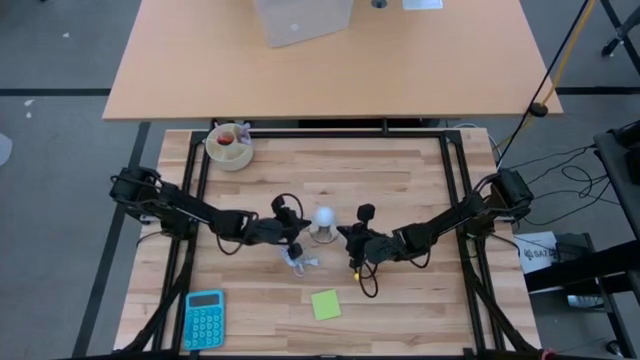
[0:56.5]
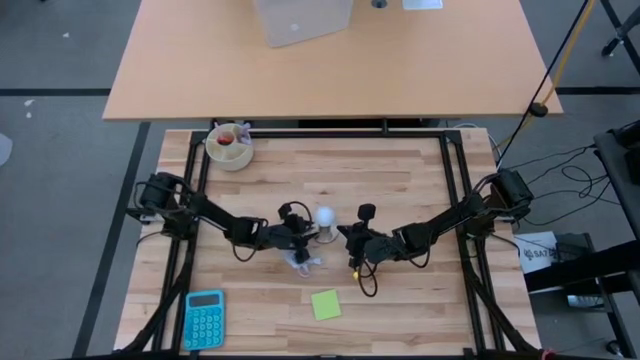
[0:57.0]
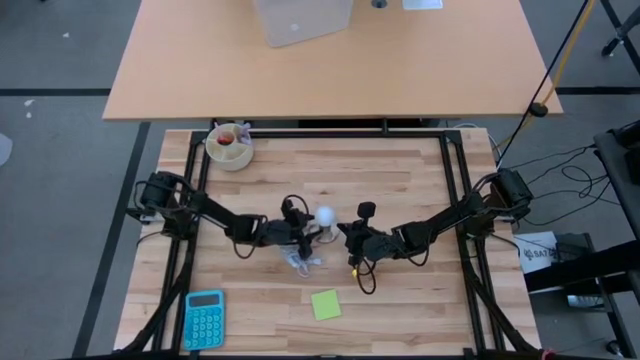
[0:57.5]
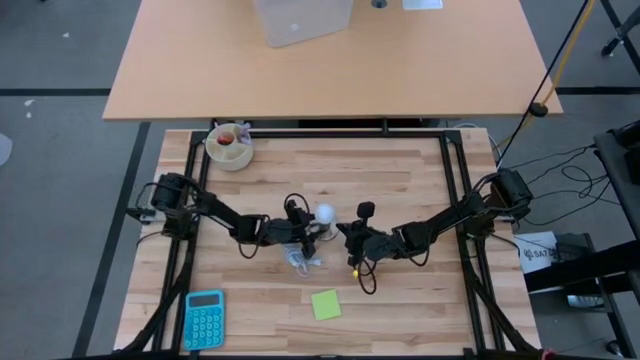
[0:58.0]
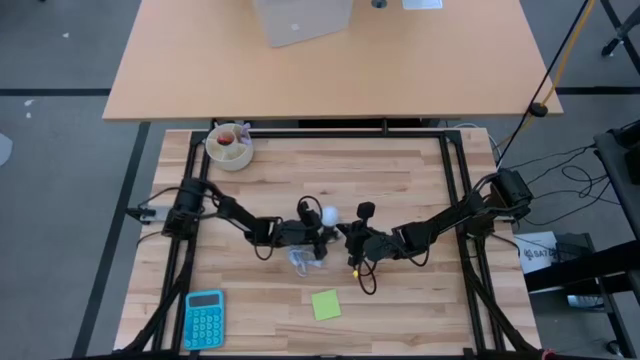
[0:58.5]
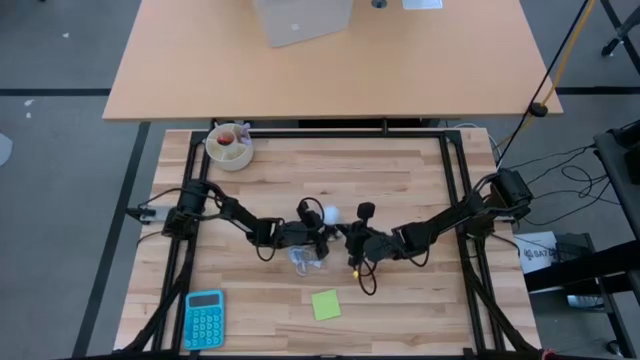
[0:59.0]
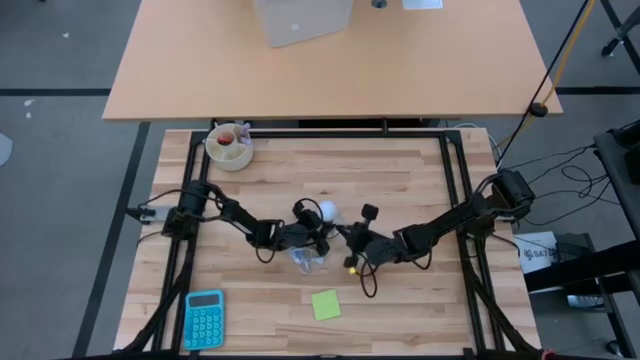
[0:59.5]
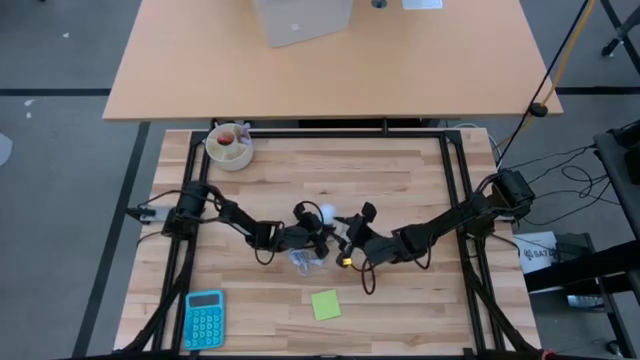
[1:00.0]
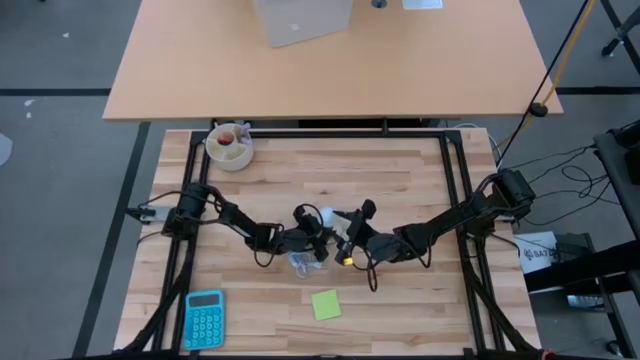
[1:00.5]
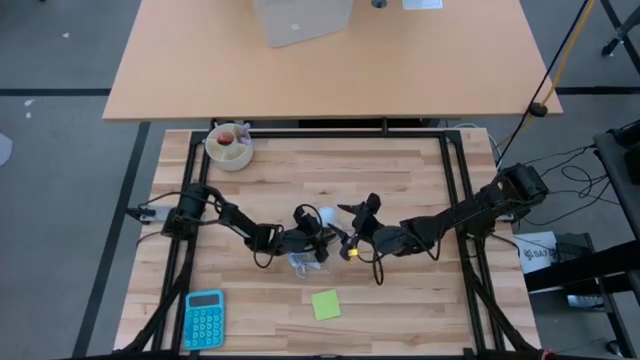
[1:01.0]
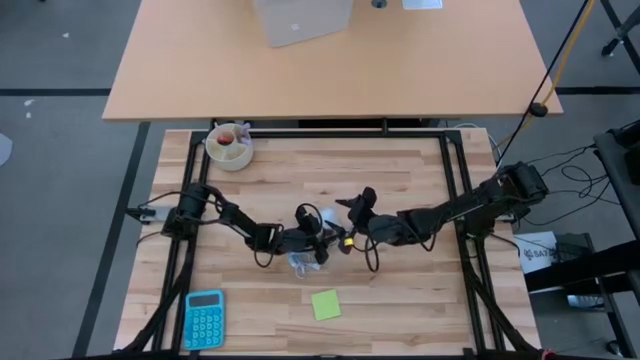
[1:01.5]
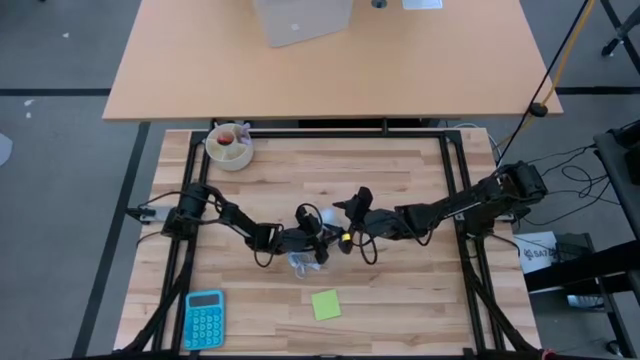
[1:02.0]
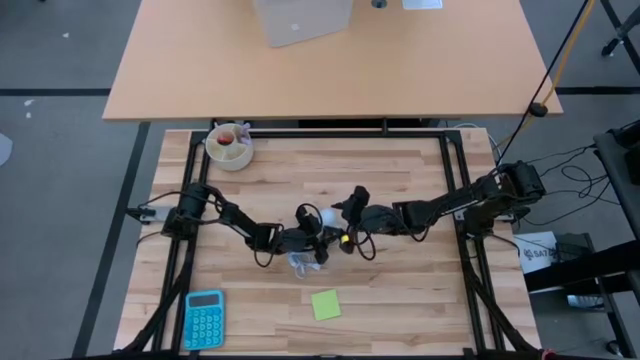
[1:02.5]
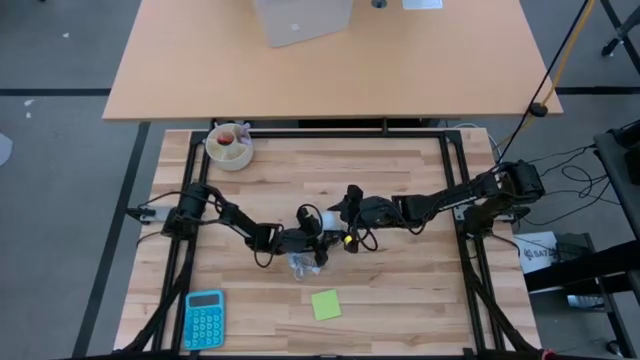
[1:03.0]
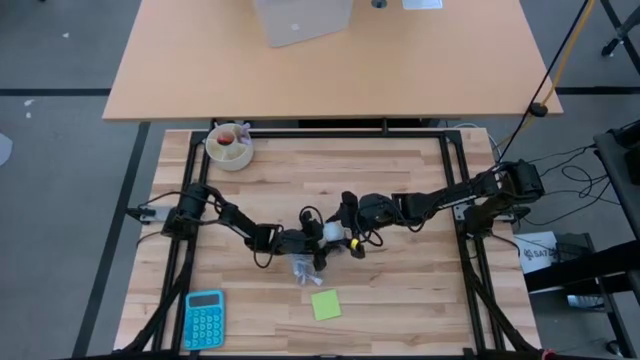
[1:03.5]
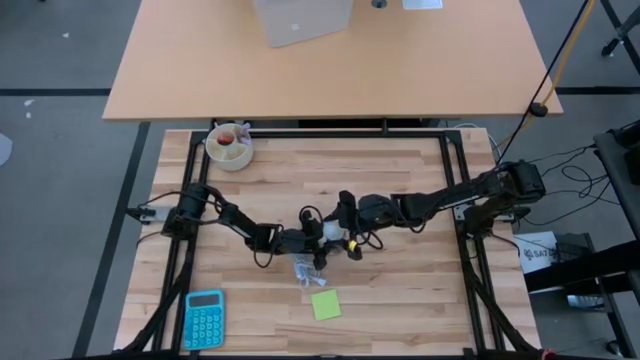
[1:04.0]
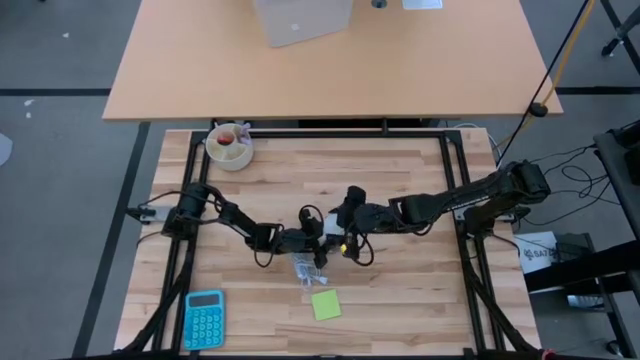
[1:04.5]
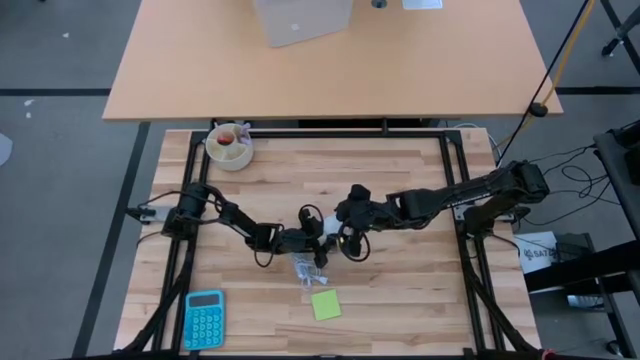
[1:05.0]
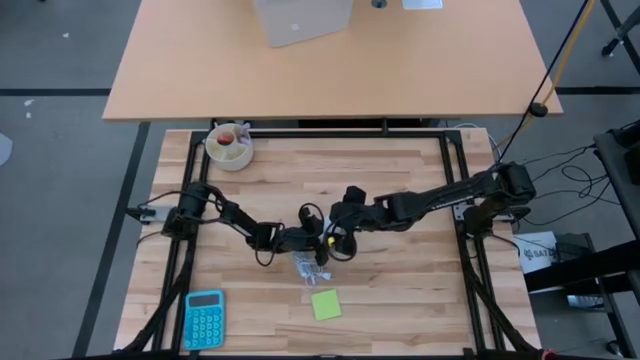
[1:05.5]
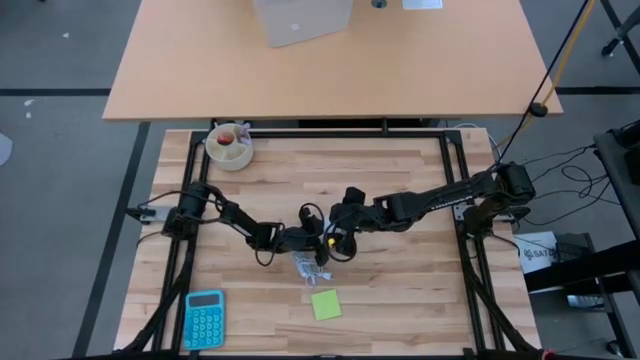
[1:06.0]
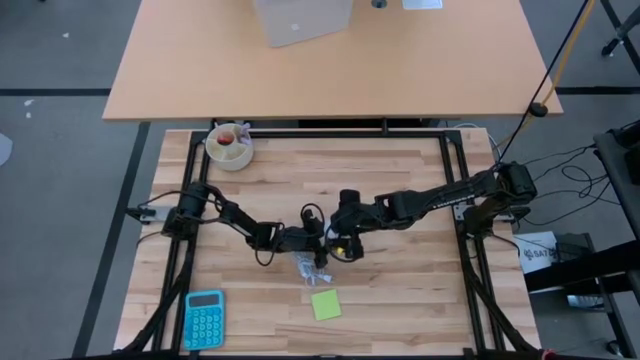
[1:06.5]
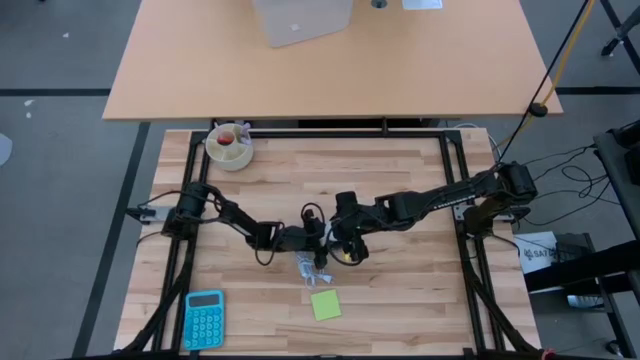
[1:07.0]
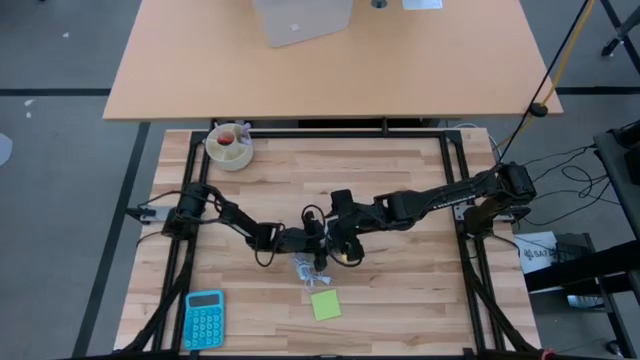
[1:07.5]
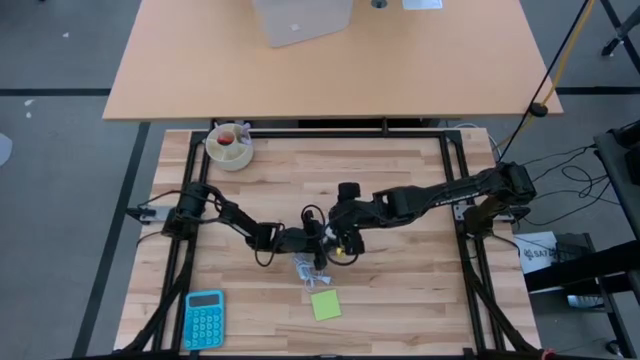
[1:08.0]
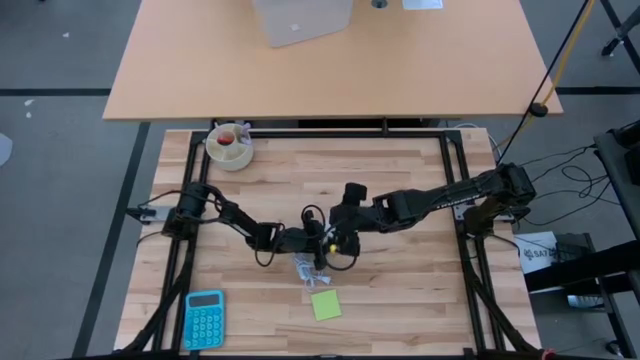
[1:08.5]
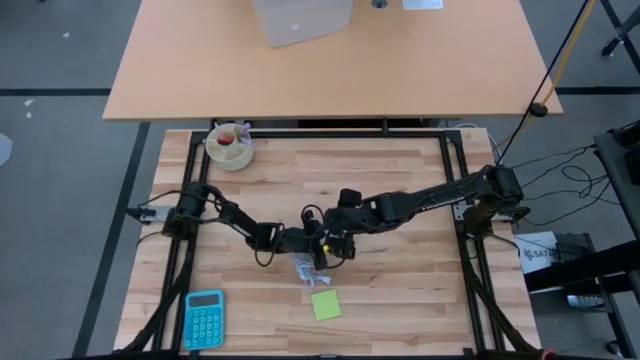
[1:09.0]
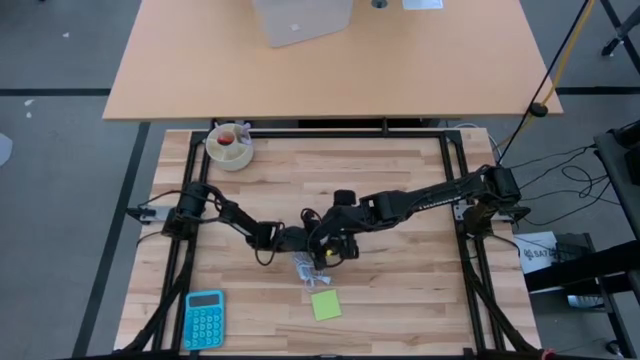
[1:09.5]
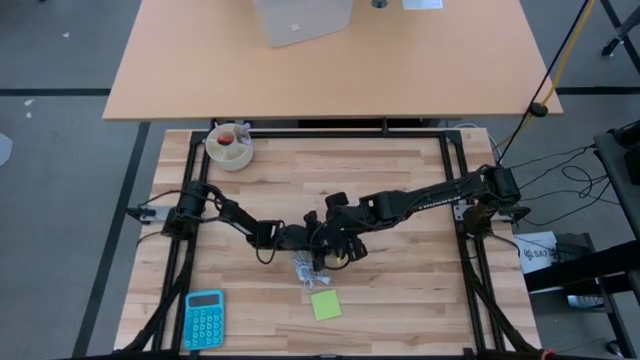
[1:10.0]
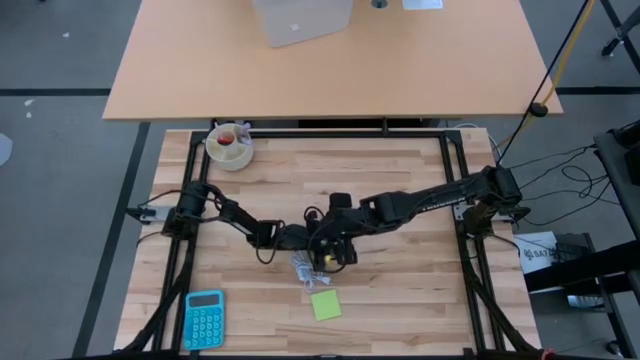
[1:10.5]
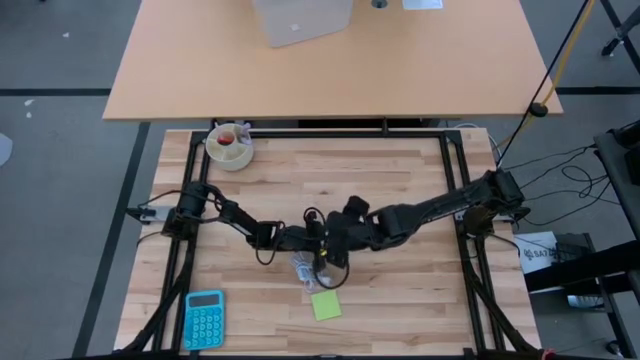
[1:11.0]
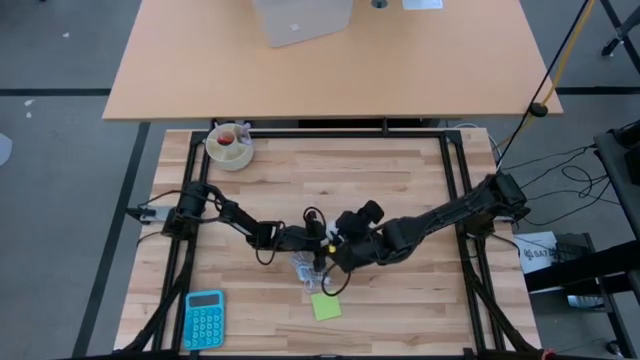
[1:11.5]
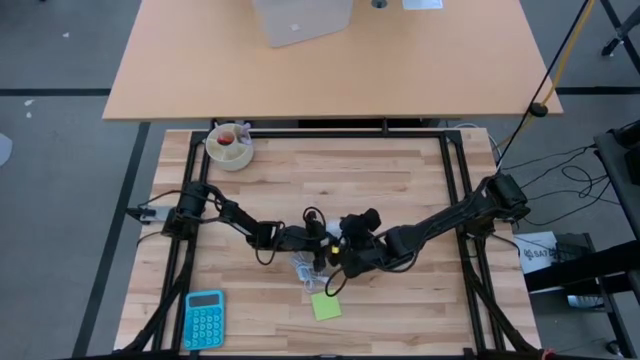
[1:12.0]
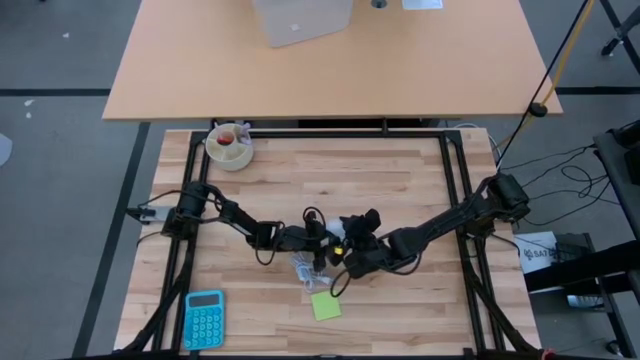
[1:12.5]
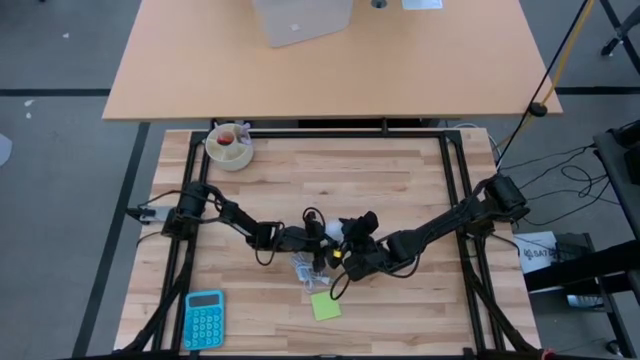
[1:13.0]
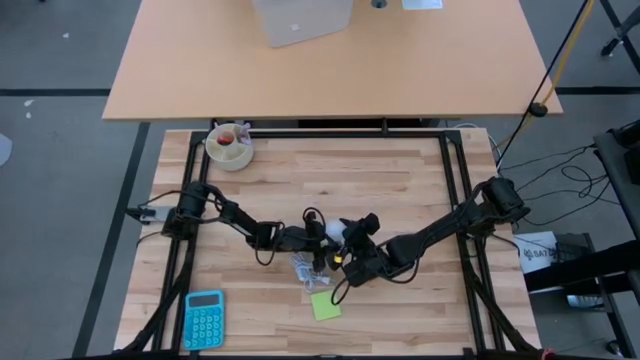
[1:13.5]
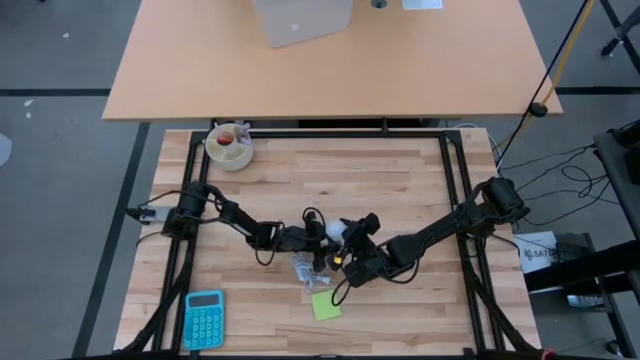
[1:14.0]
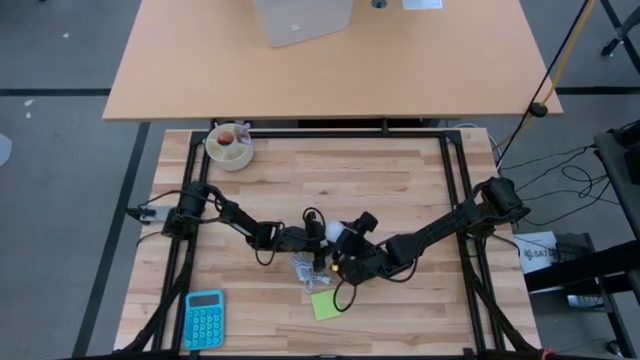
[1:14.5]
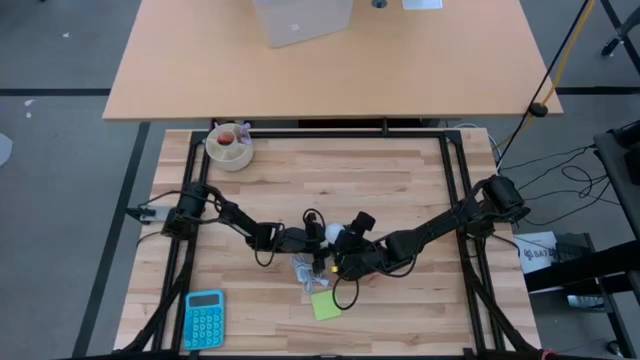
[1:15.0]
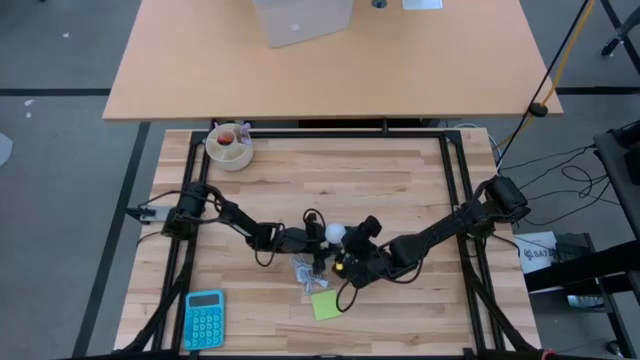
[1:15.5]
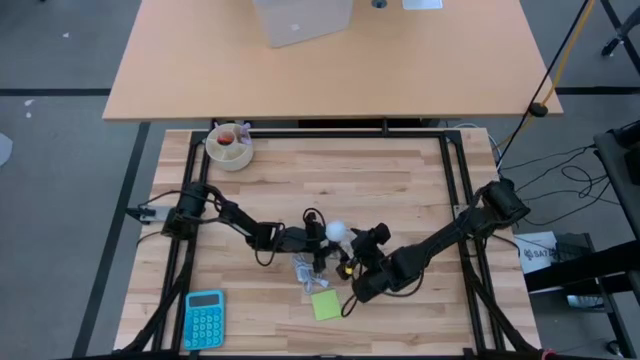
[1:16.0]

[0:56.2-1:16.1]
Task: Screw lightbulb
Remove the lightbulb from the lamp

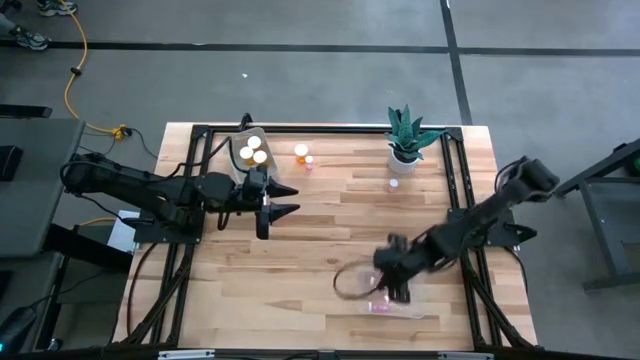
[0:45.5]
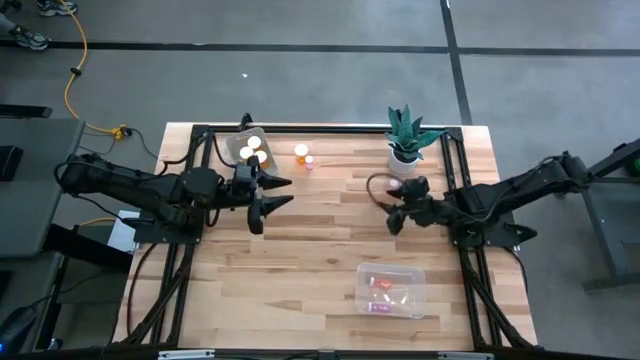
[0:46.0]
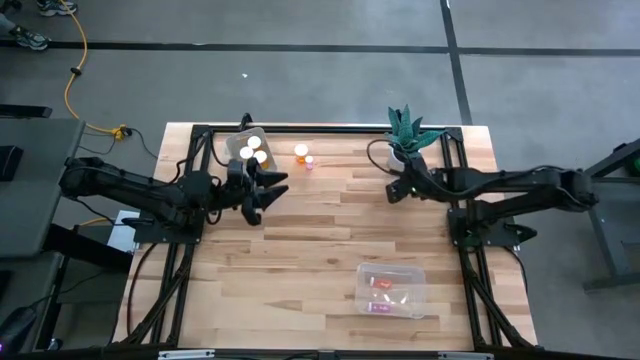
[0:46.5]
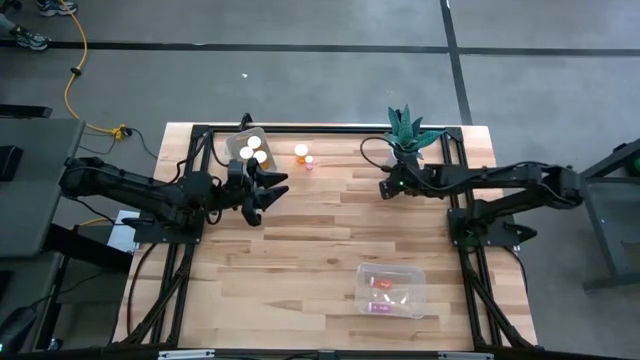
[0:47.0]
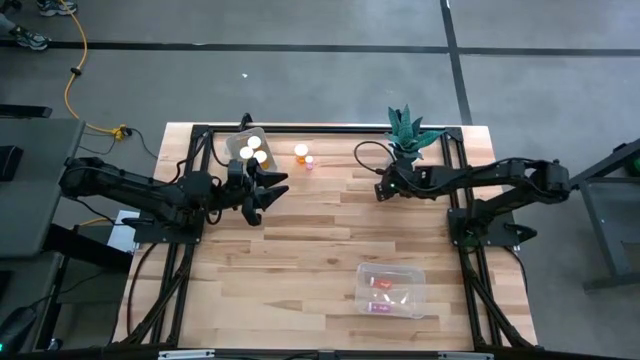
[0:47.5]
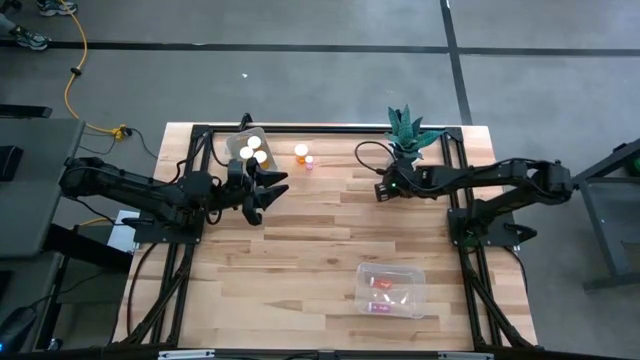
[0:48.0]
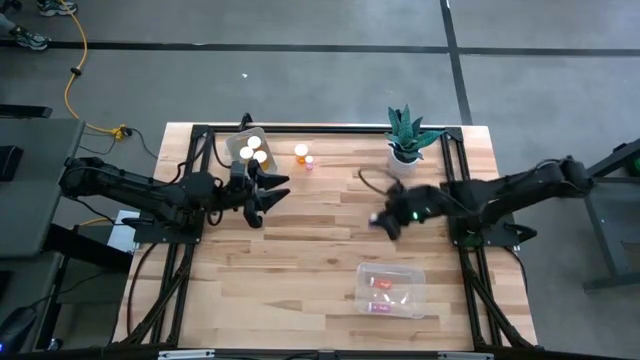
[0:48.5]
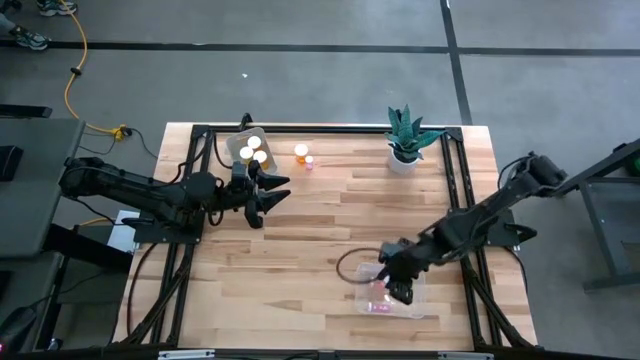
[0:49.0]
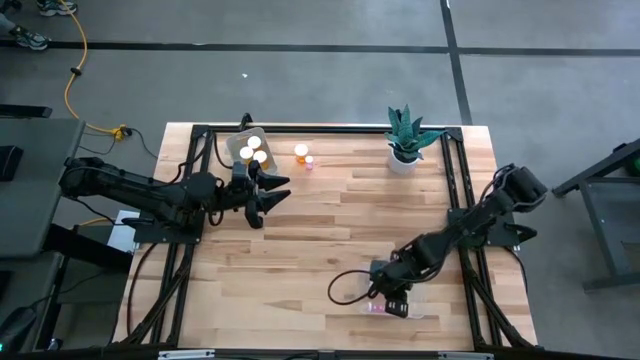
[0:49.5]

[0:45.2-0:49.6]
Task: Pick and place medicine bottles into bin by pill shape (circle, oval)
Put the small pink pill bottle into the transparent bin
